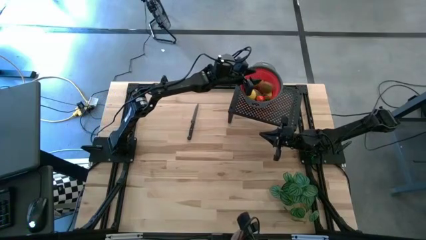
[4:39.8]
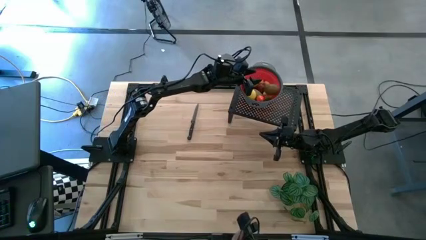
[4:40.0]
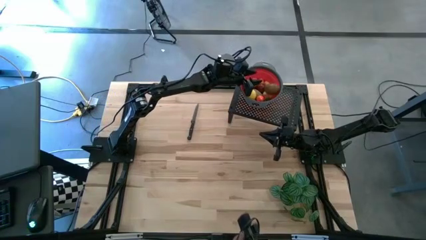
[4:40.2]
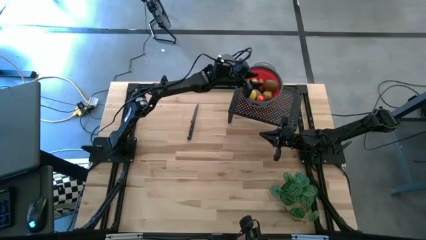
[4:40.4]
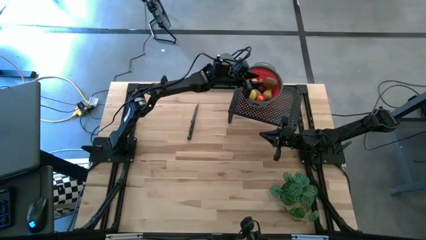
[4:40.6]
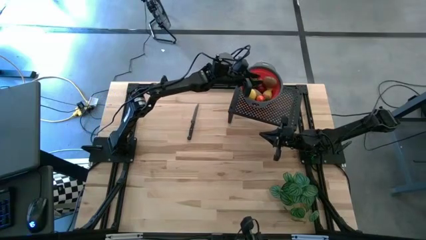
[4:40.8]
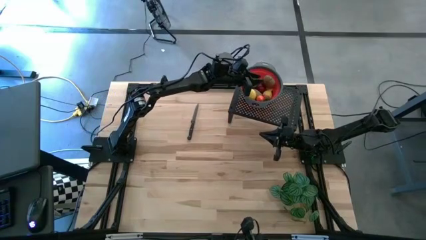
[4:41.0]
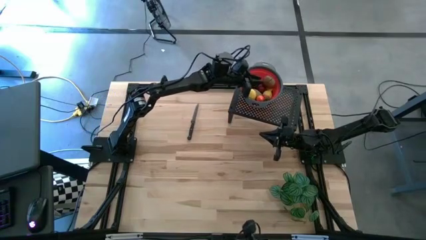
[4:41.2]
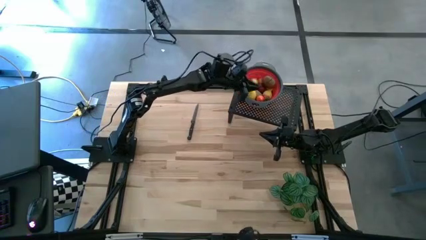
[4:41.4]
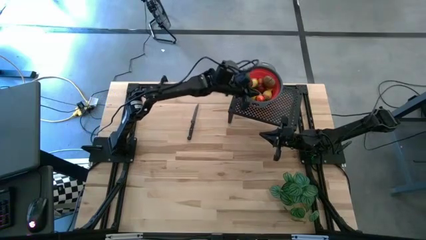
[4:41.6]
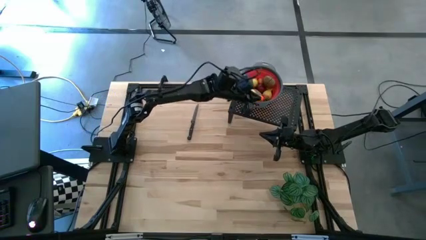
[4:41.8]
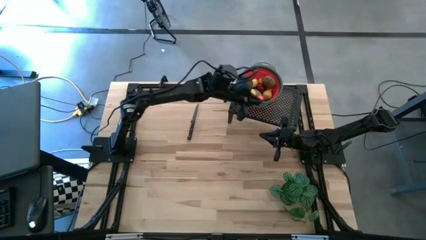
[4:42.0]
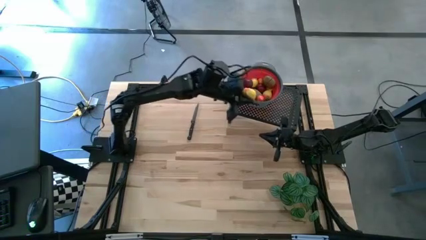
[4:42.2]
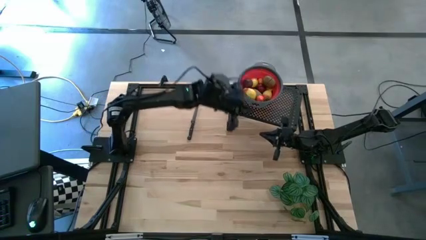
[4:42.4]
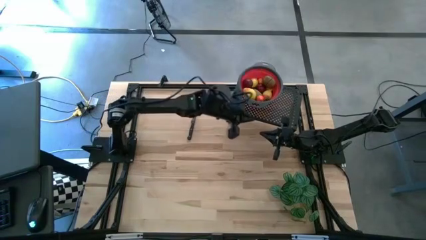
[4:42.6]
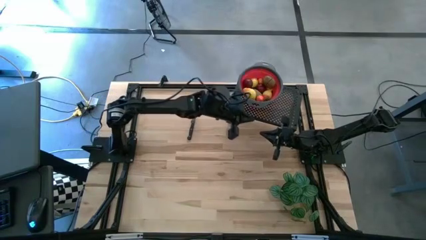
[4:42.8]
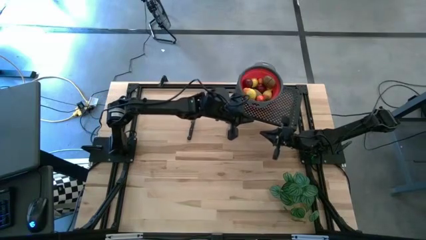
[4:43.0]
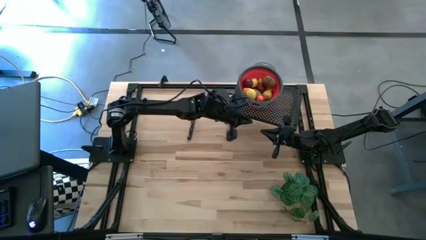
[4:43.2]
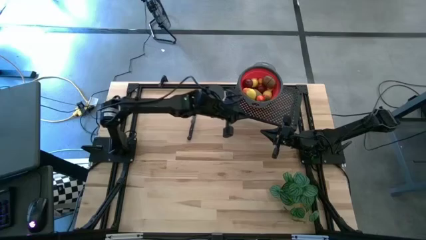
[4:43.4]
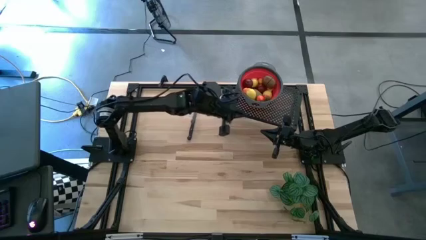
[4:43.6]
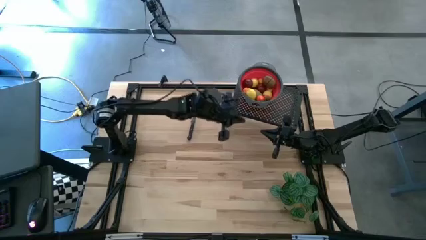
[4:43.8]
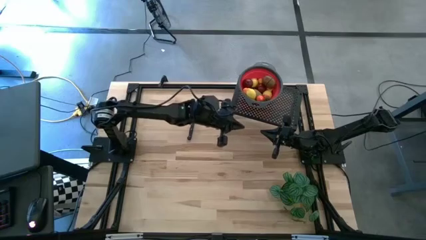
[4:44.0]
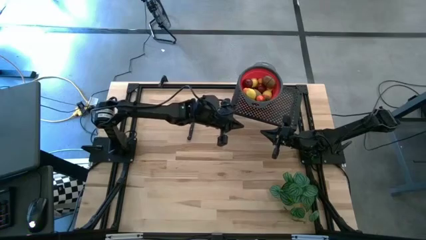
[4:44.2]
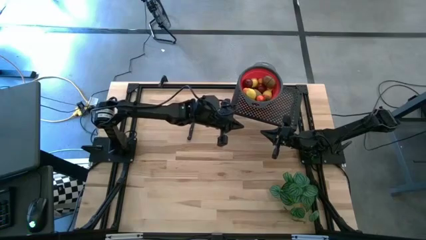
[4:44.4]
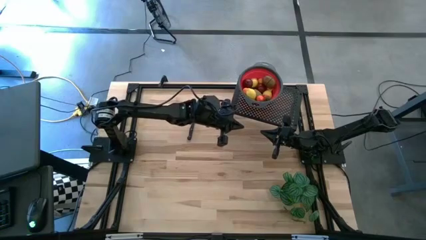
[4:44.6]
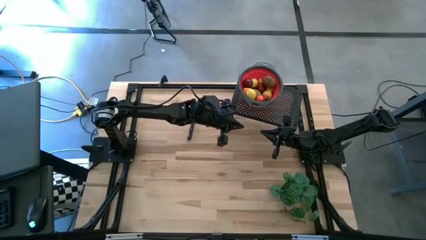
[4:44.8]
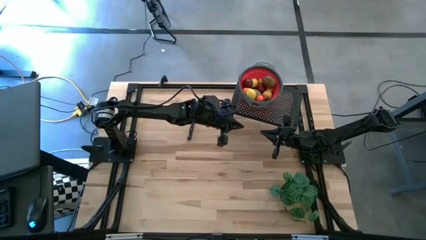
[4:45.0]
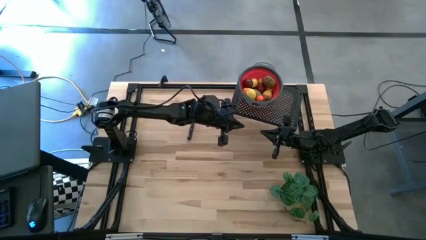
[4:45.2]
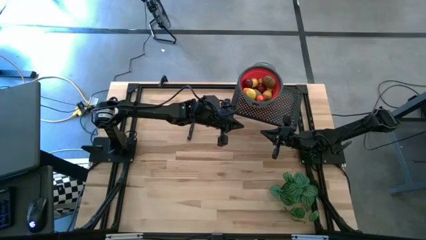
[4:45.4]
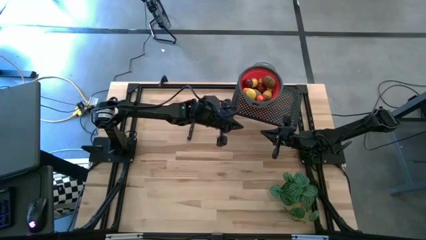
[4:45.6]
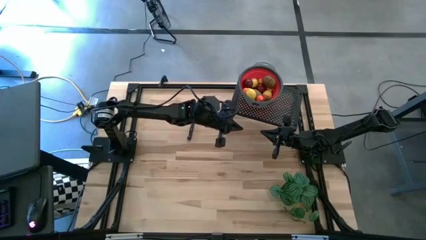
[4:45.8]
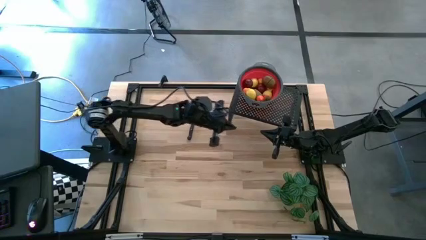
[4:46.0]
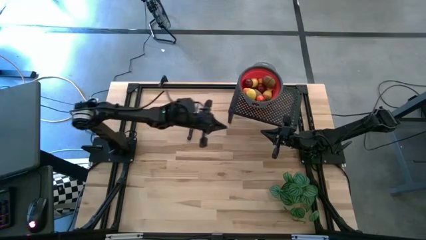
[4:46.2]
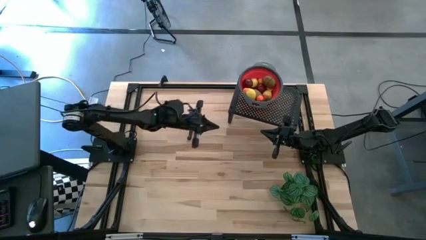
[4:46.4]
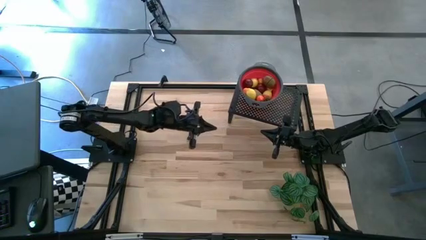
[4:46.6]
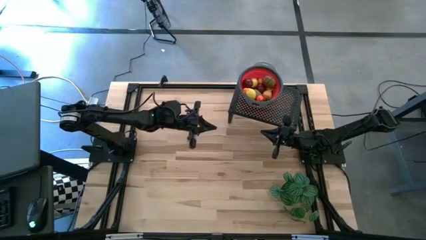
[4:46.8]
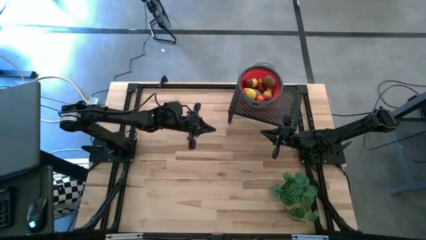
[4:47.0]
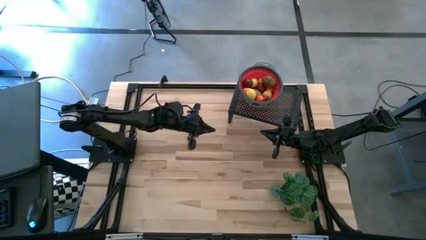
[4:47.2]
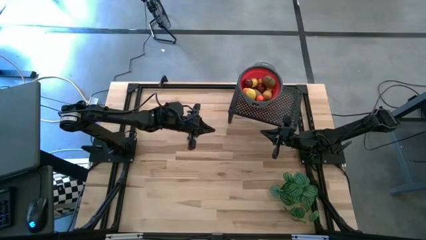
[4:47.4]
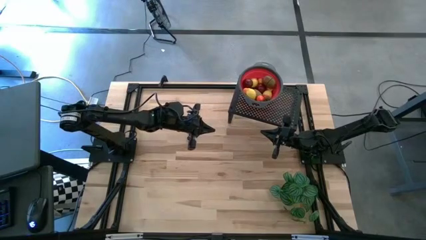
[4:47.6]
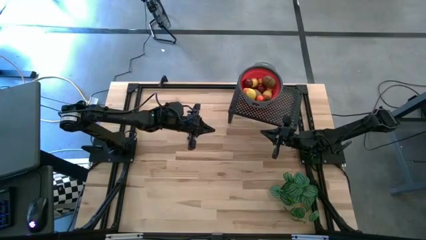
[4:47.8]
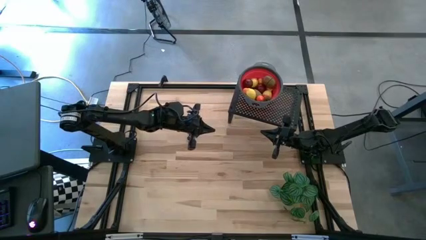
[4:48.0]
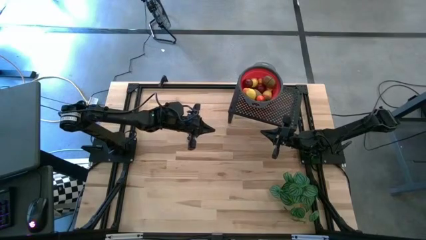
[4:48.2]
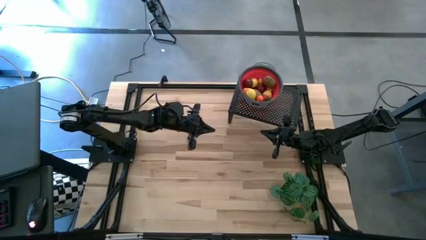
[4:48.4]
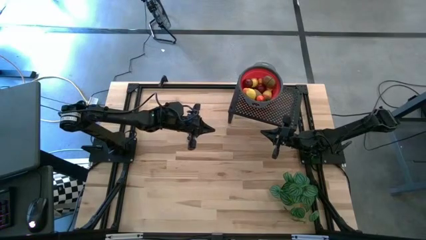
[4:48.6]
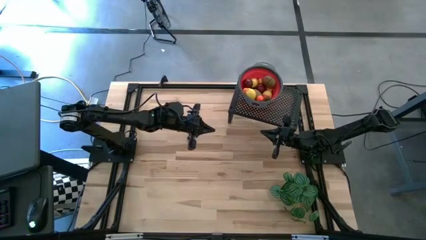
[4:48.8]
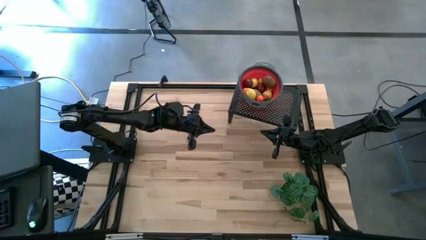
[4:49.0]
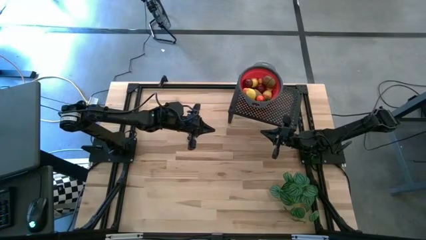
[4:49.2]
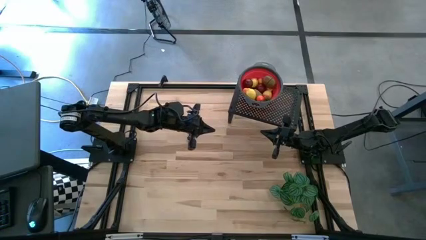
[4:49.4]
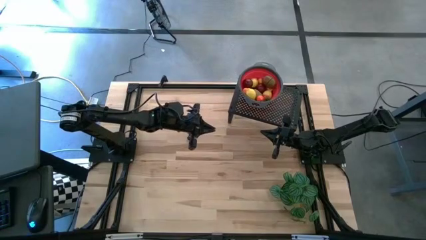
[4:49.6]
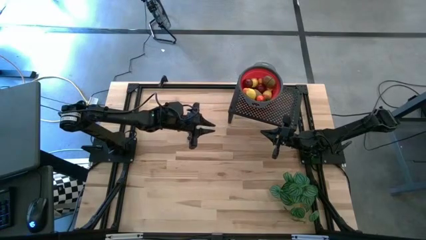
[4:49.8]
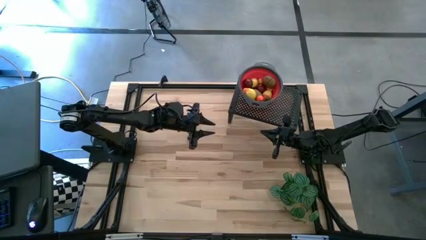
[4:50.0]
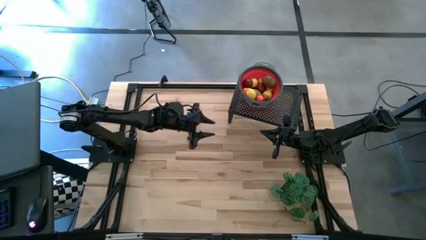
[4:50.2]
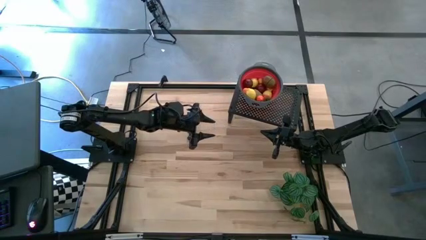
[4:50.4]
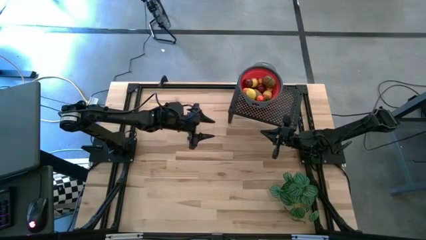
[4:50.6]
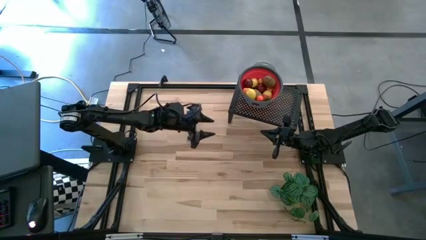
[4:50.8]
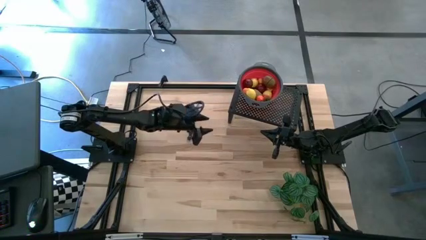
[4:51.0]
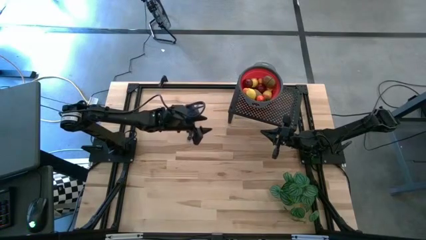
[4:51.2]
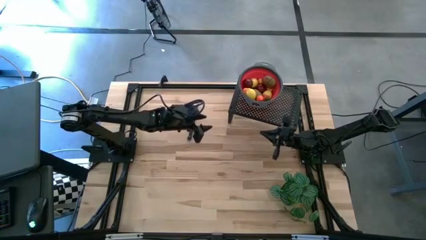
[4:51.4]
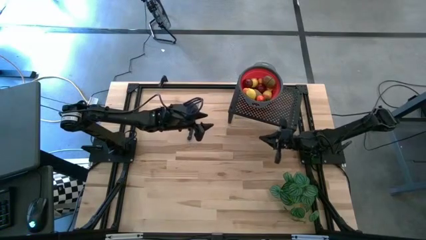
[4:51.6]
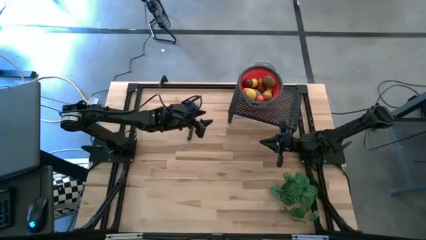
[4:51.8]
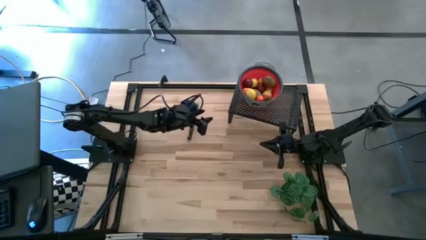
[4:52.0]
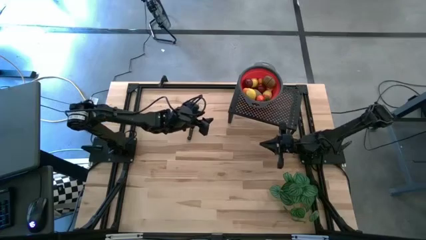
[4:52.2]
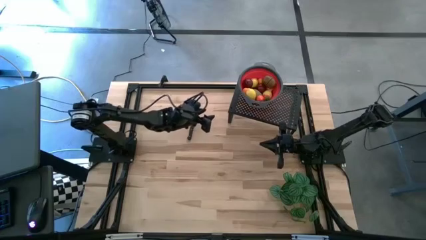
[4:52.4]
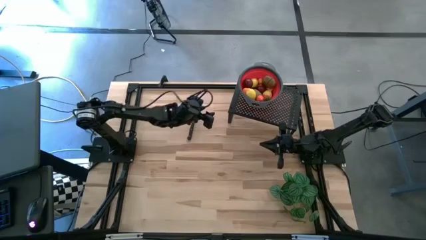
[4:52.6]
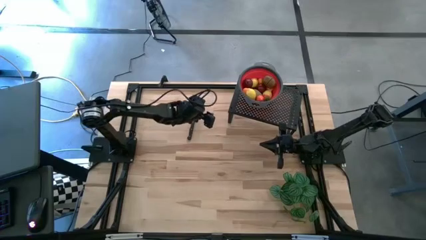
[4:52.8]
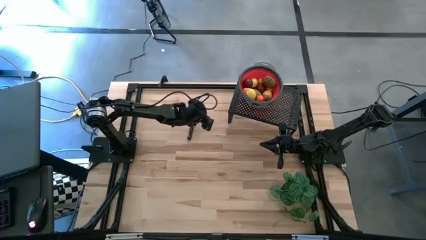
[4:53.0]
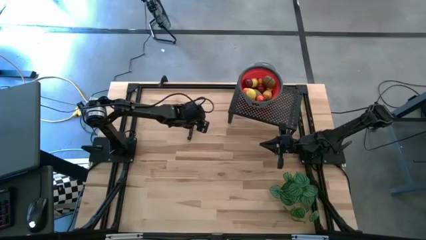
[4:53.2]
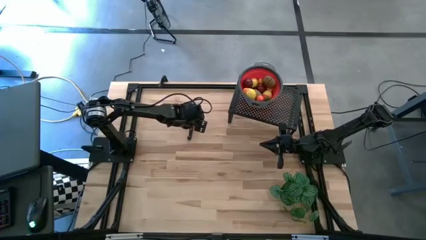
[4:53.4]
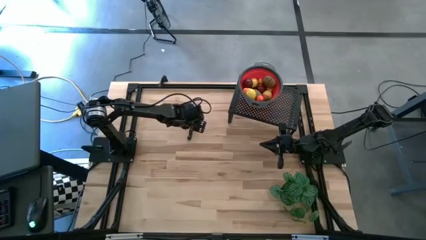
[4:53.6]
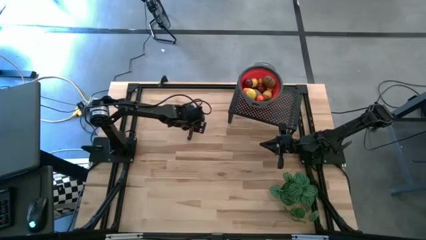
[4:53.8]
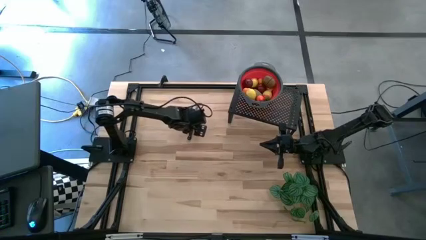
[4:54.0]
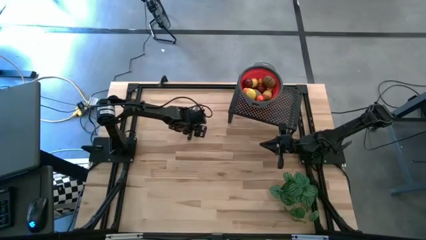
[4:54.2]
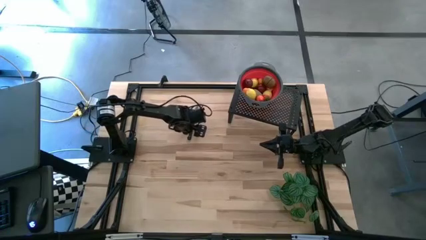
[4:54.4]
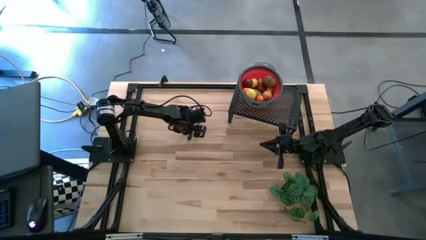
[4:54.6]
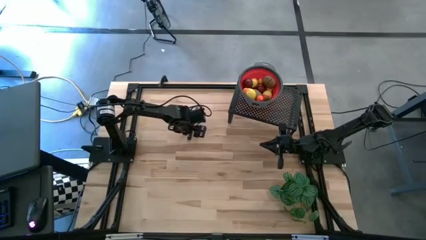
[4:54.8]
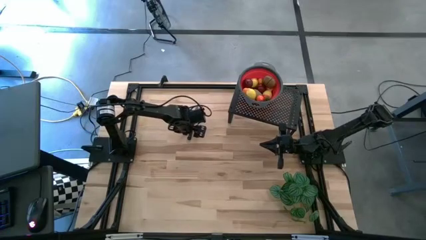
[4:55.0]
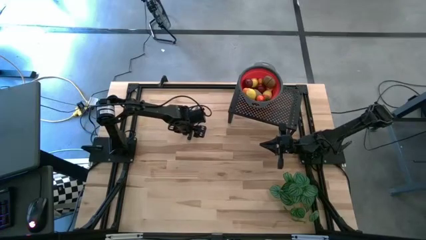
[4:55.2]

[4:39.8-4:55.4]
Task: Pick & Place Fruit
Put the black knife on the shelf

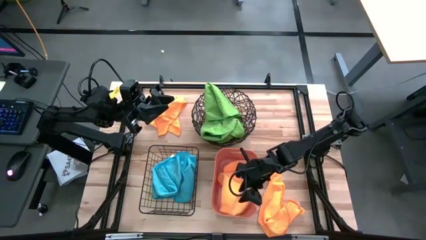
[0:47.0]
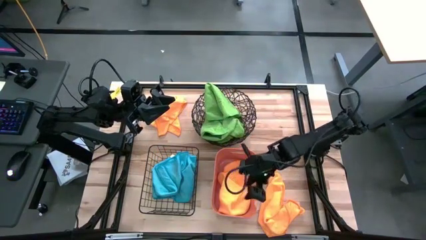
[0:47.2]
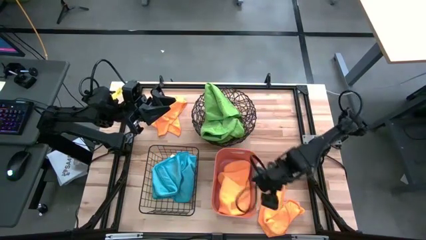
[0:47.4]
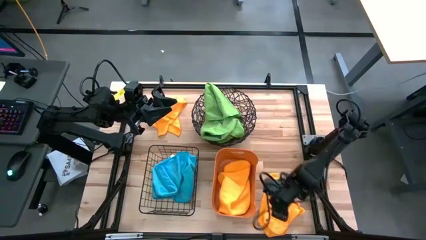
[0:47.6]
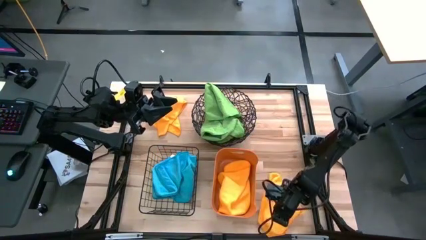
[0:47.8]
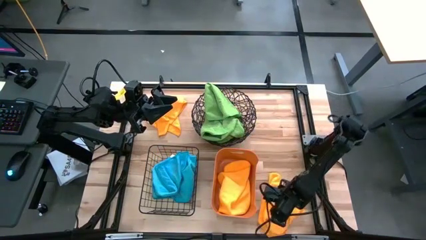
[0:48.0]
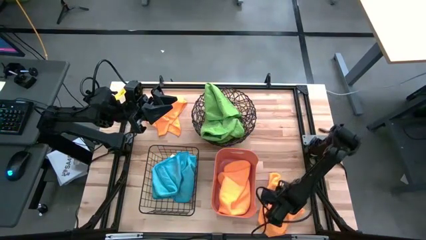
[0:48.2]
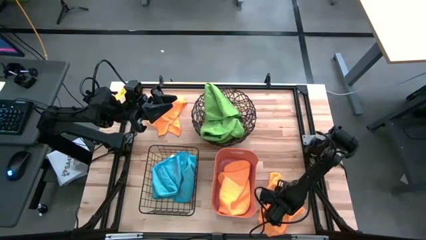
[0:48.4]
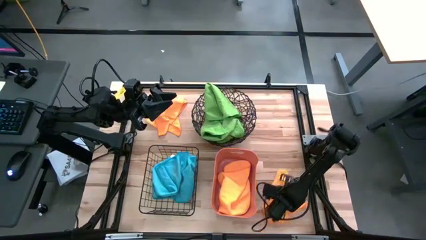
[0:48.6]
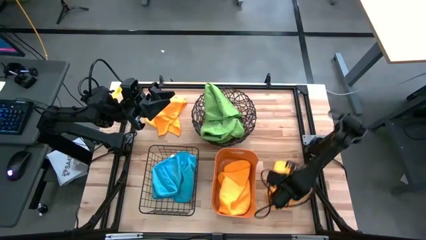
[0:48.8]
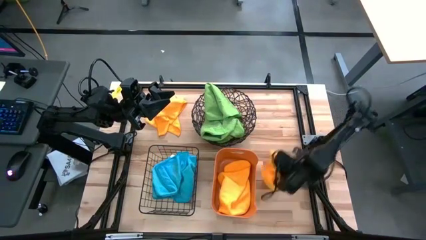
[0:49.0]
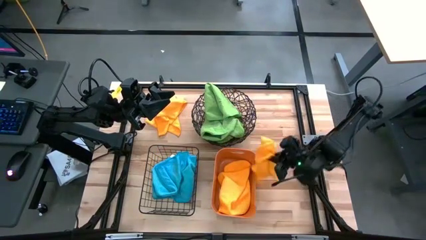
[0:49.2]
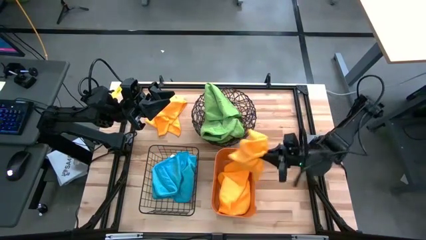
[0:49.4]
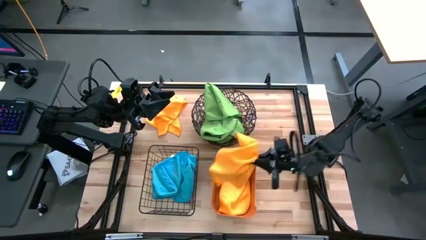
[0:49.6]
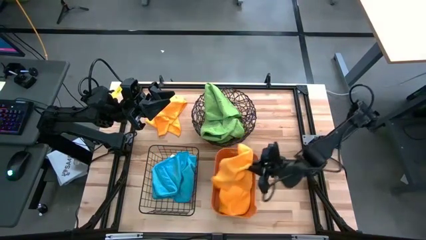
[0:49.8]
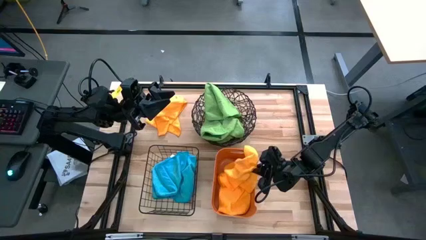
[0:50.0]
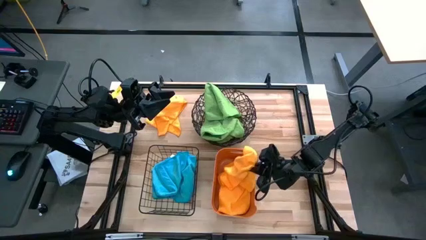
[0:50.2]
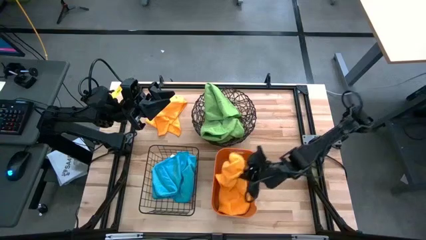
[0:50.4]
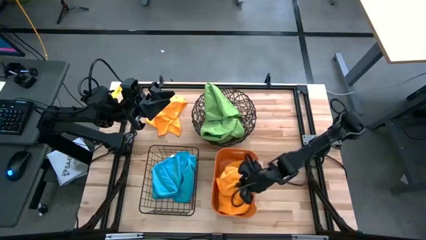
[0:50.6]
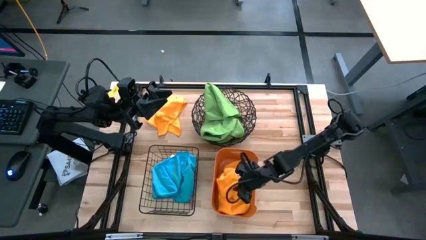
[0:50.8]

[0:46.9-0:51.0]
Task: Sort microfiber towel by color & place in baskets
Put the bottom orange microfiber towel into the orange bin
